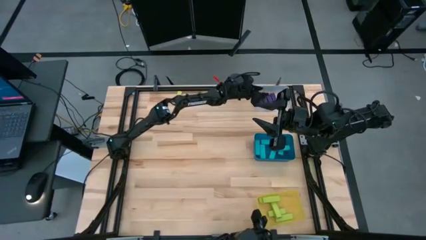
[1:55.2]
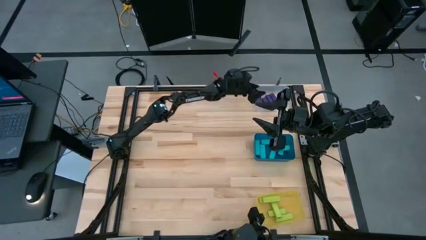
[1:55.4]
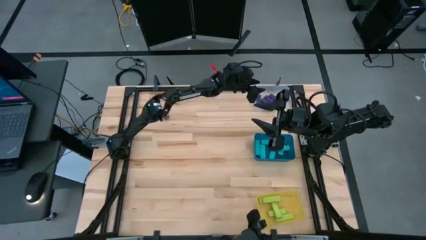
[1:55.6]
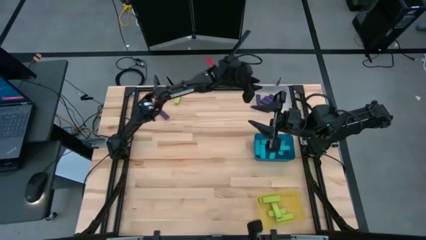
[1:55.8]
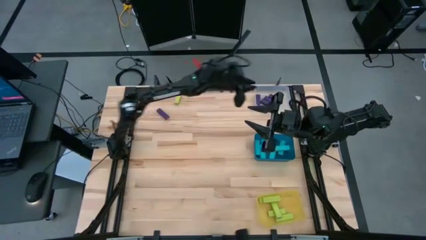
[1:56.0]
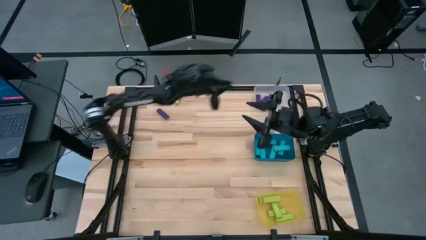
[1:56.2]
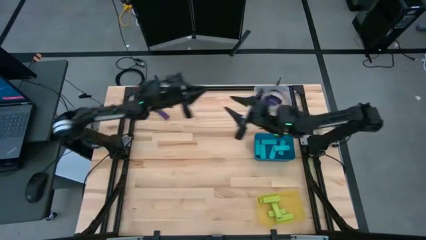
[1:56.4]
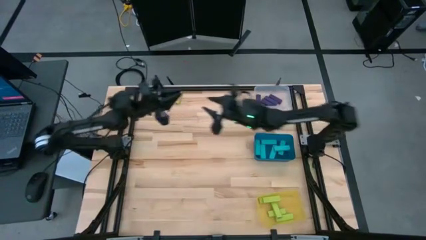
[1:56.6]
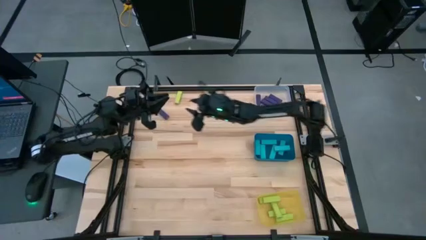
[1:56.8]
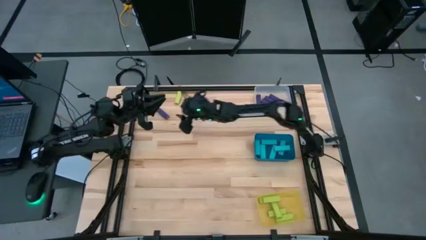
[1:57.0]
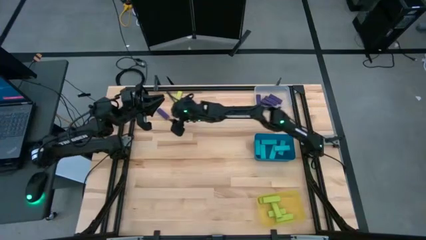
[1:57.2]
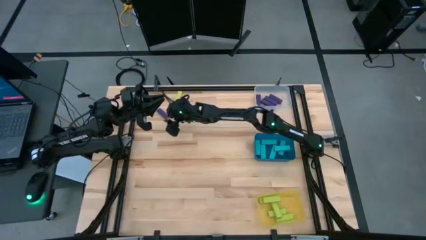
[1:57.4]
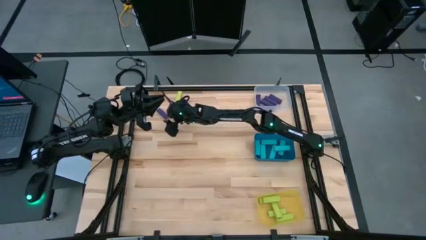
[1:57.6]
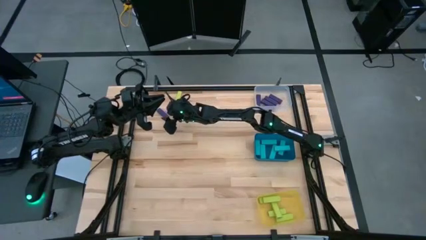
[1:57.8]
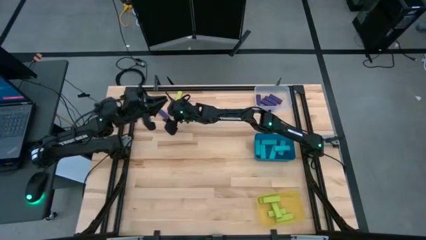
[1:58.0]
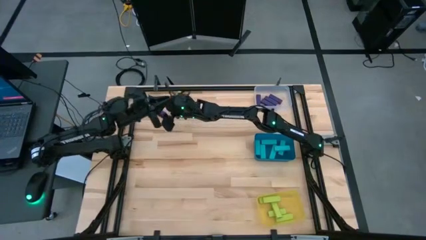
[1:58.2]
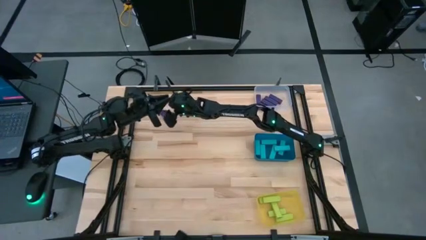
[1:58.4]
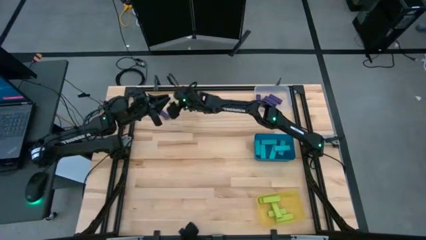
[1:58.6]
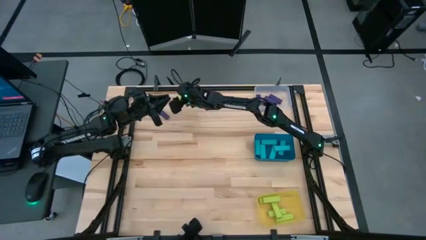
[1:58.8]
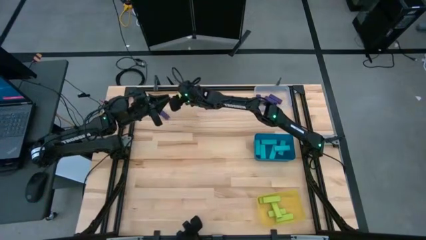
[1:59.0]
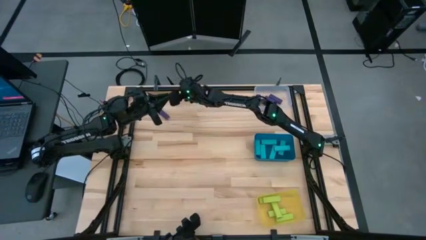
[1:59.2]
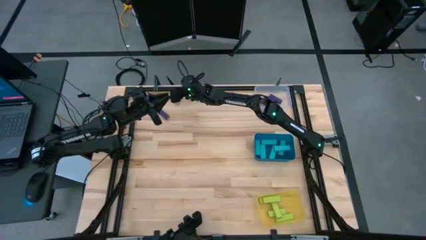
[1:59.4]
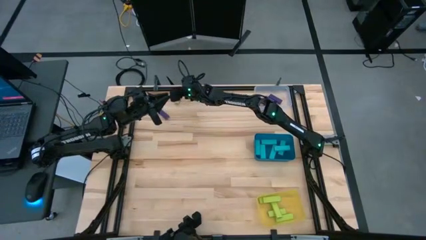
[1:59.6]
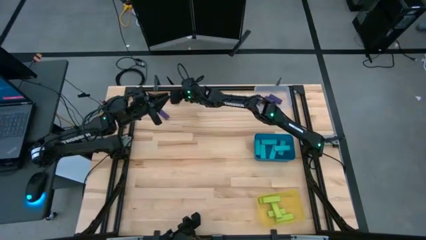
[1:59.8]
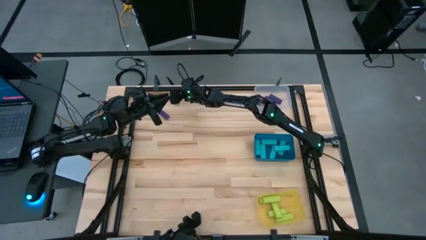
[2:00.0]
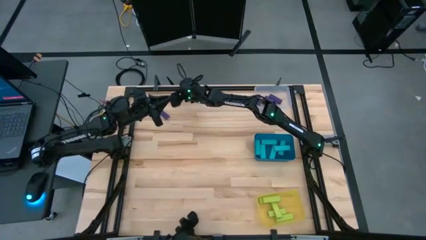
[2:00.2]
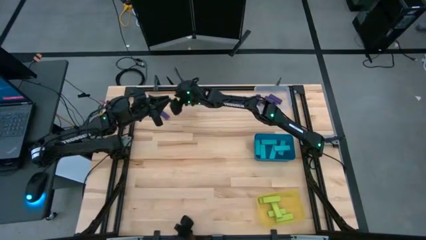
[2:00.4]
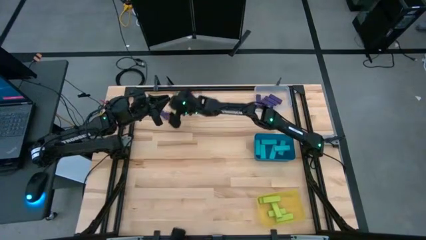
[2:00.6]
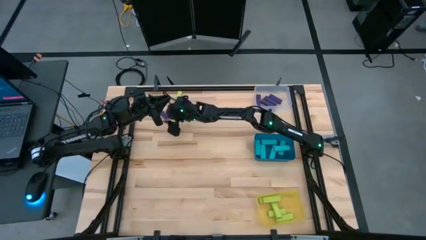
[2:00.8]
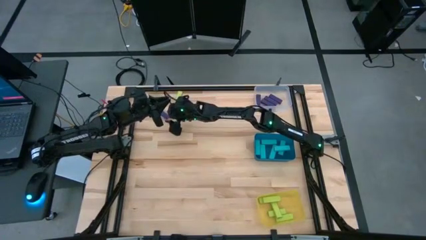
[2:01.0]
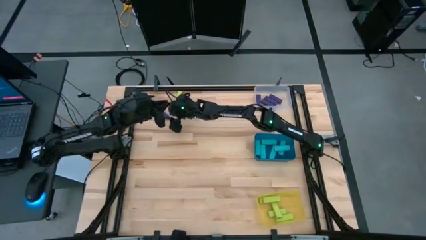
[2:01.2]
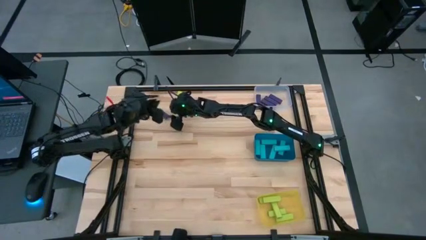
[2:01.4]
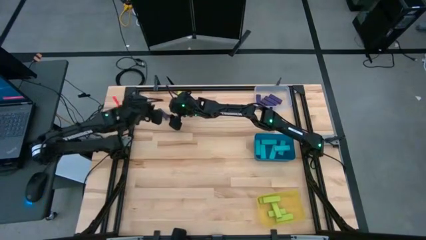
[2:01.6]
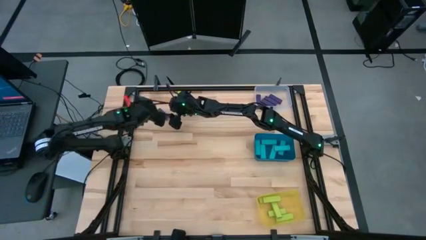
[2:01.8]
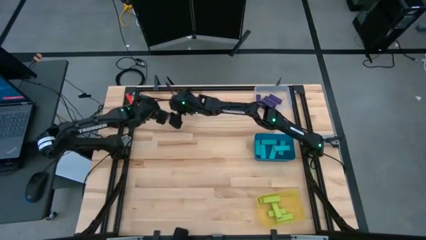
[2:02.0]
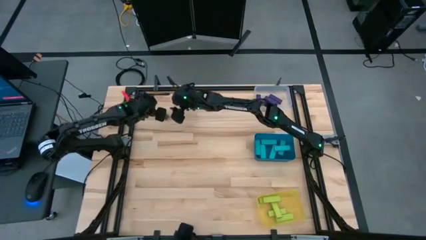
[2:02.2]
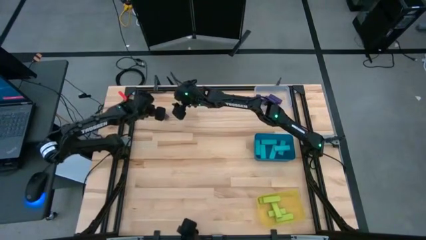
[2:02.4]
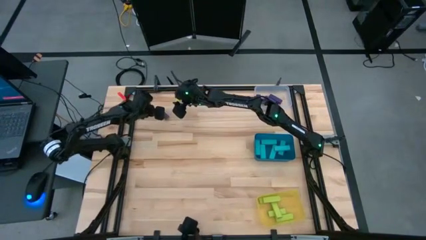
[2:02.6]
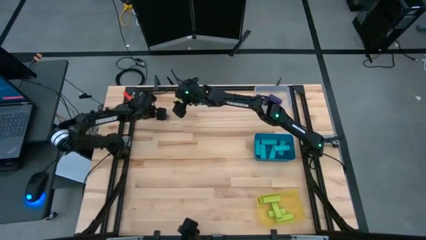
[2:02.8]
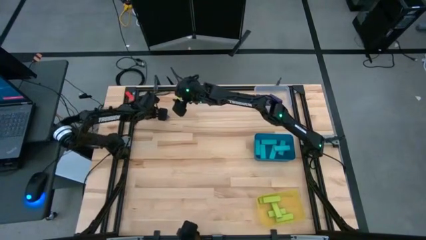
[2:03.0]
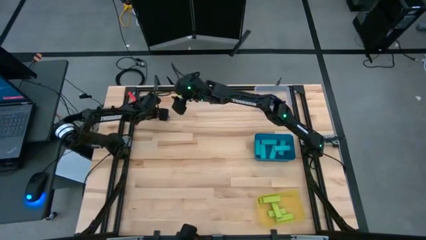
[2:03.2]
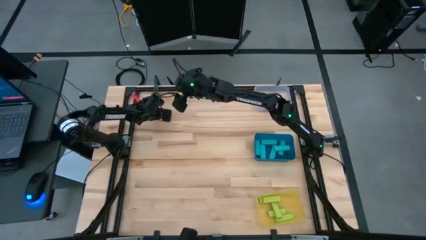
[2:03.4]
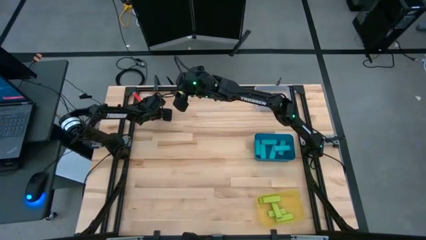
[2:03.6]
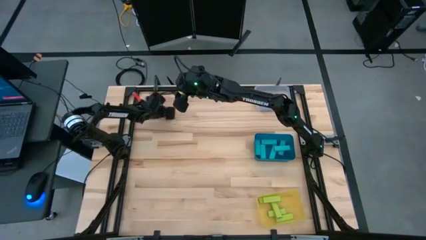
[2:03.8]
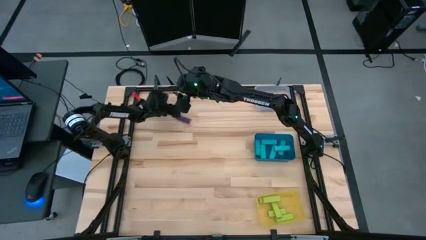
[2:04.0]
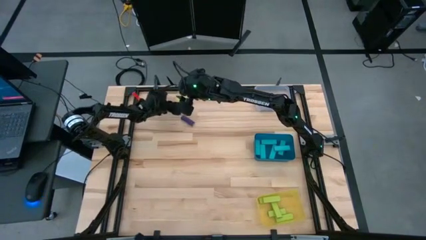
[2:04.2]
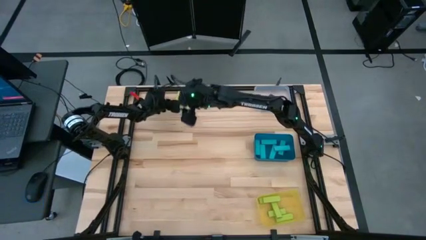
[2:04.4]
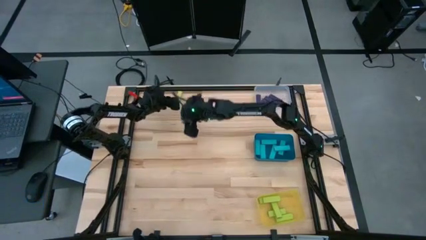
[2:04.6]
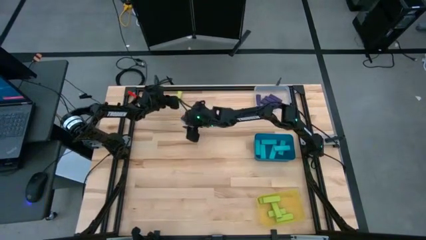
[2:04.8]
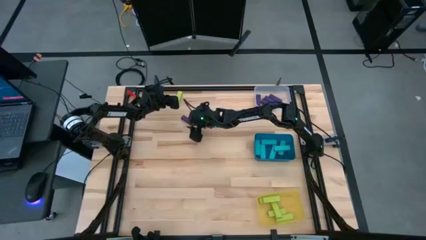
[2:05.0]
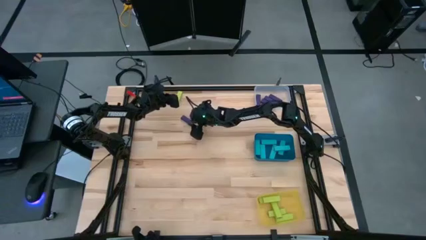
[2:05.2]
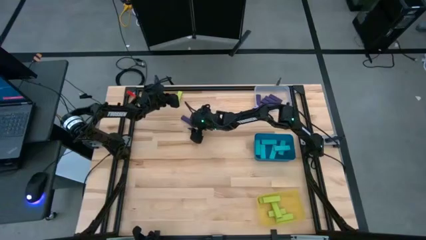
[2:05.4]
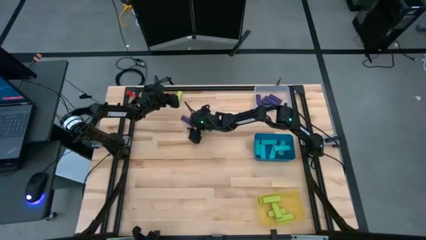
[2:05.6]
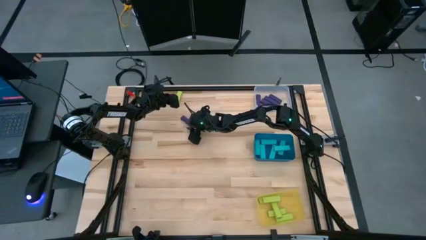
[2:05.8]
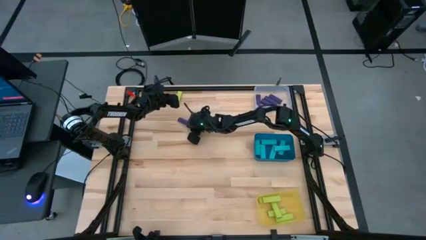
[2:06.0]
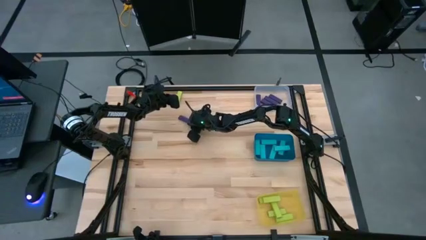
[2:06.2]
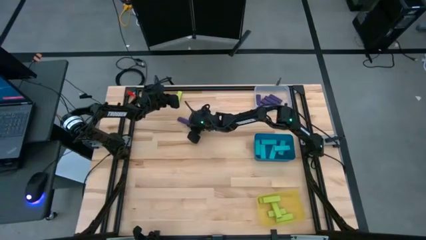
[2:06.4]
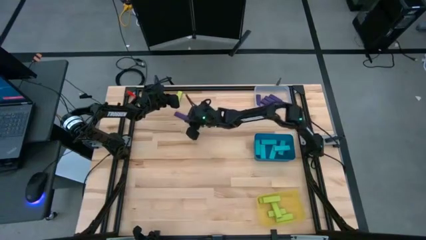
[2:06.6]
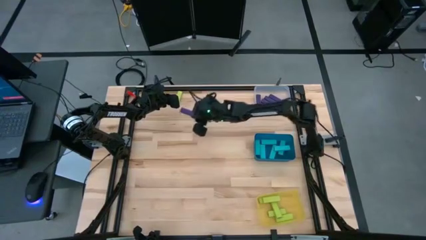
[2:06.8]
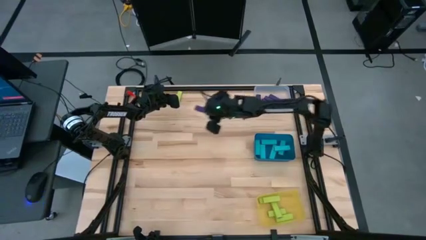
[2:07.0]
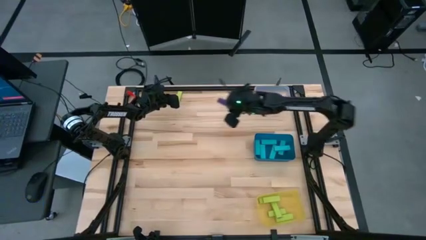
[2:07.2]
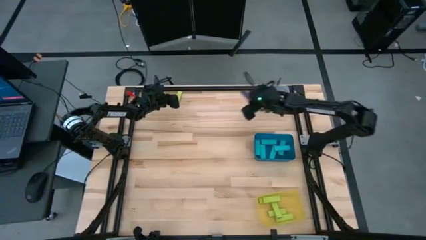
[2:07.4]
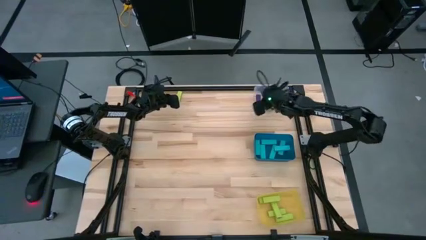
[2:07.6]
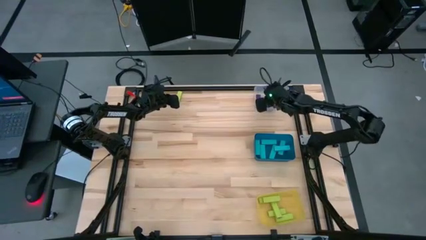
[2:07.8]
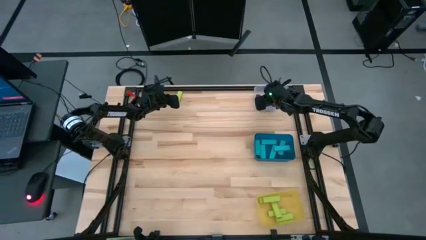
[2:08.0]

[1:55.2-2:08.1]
Task: Sort blocks
Put the purple block into the transparent bin

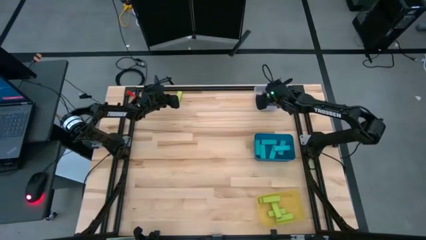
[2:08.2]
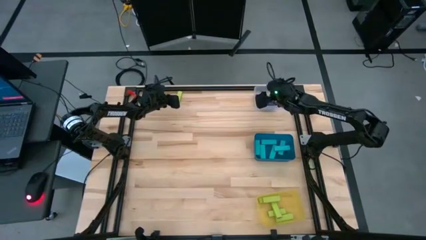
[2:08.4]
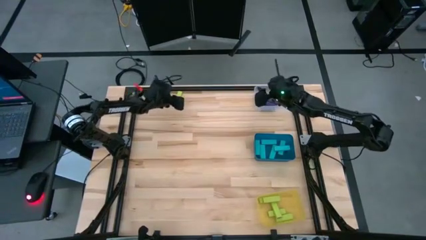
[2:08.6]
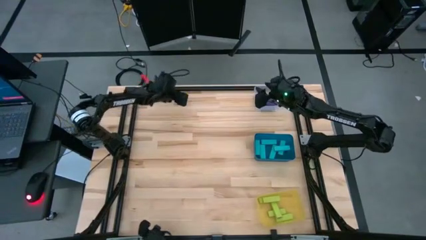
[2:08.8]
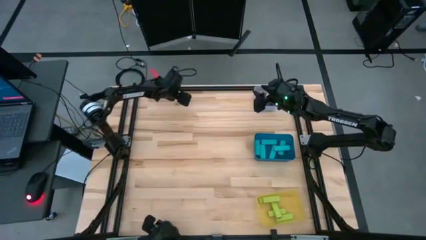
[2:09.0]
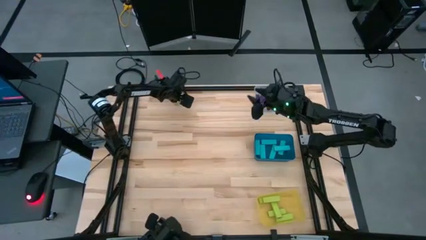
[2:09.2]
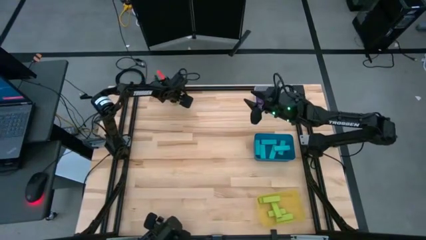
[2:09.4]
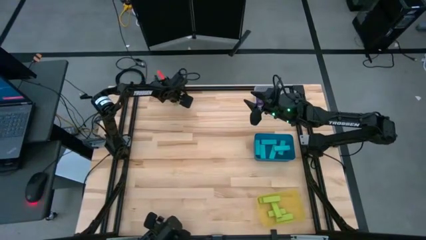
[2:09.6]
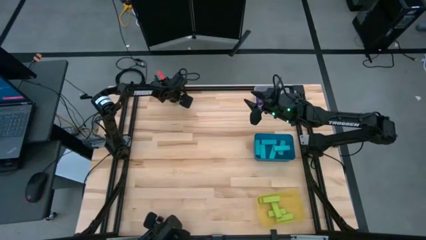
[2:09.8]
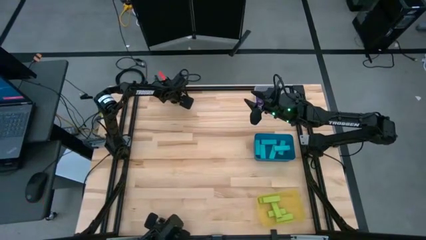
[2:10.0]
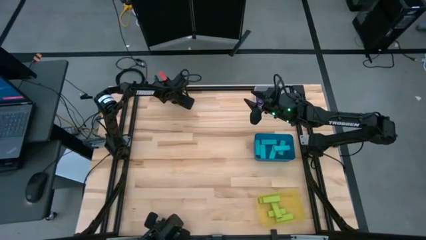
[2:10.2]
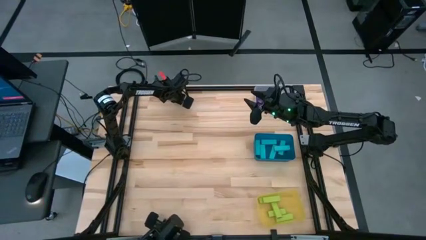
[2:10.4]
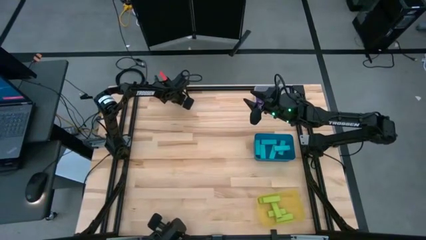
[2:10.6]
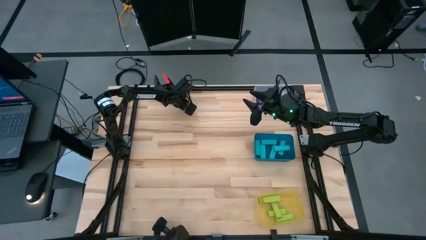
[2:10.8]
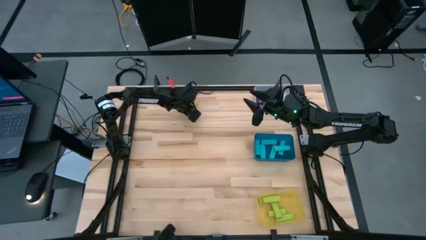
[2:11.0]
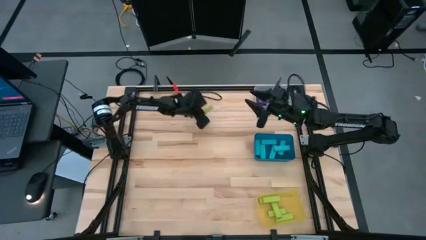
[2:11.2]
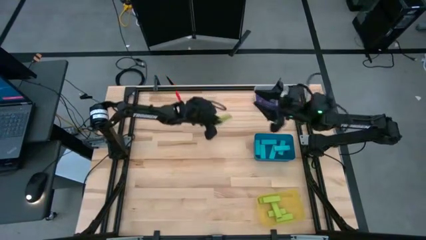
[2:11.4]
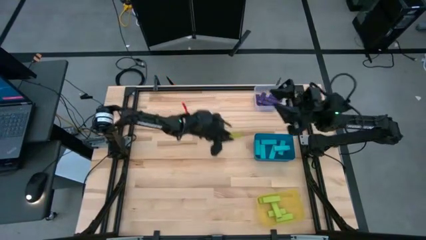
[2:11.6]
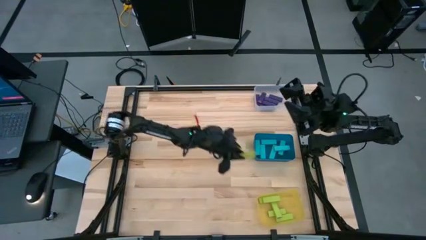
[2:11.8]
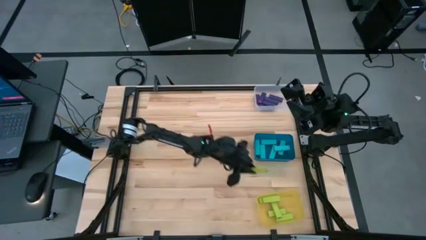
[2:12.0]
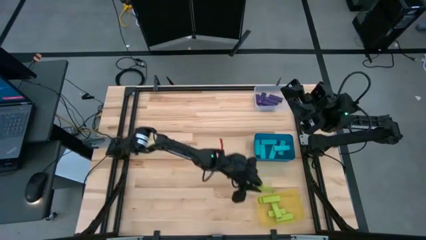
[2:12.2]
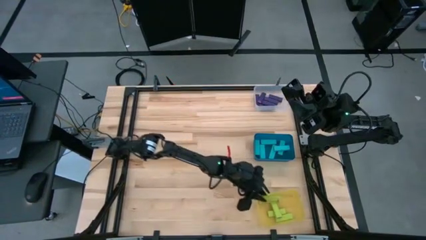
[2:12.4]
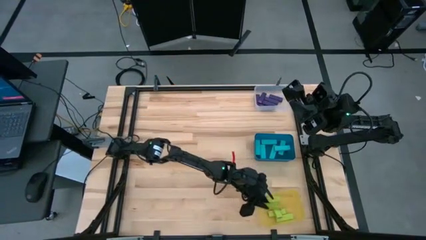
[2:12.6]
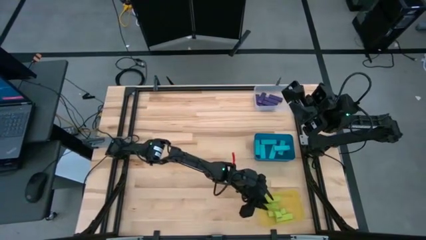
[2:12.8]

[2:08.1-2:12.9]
Put the light green block into the yellow bin
